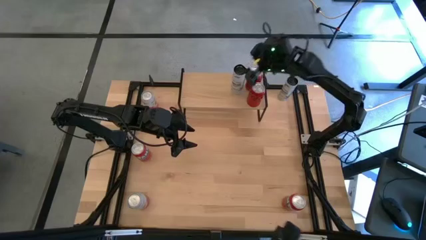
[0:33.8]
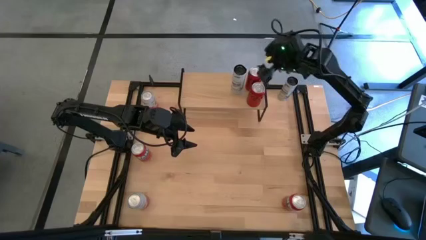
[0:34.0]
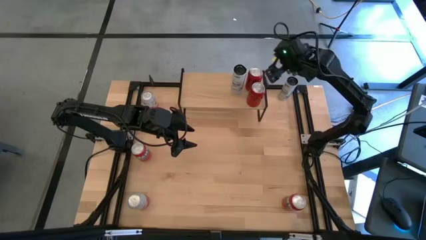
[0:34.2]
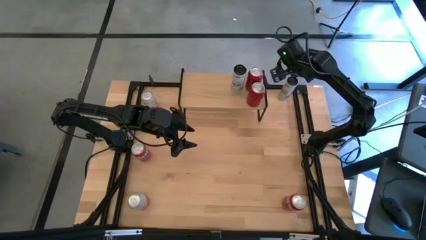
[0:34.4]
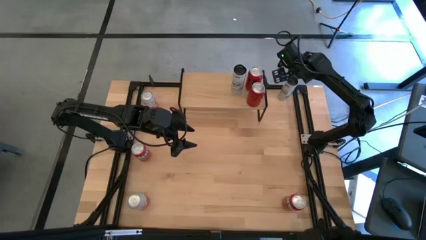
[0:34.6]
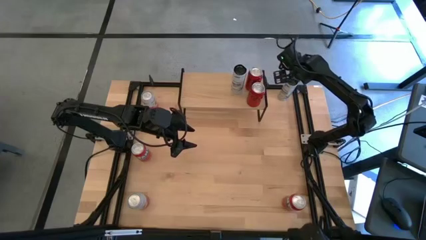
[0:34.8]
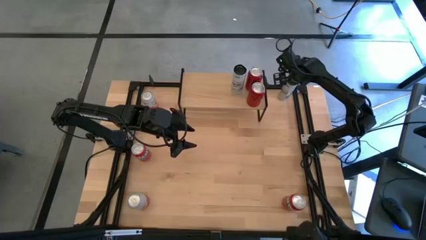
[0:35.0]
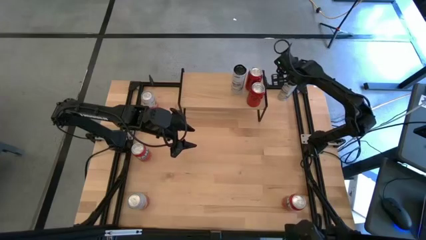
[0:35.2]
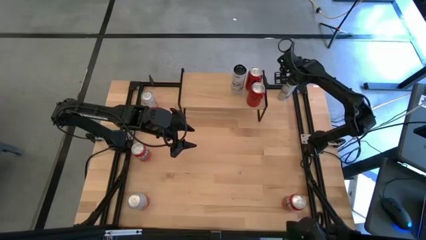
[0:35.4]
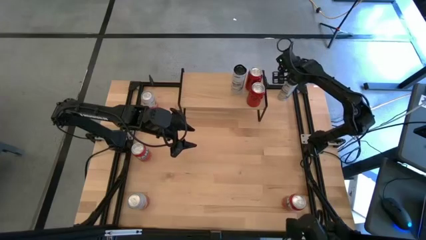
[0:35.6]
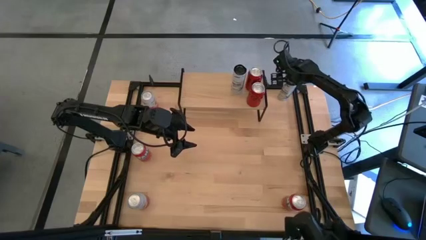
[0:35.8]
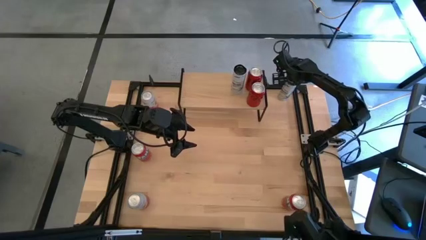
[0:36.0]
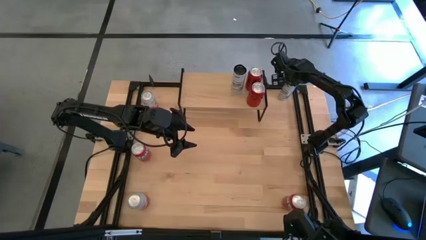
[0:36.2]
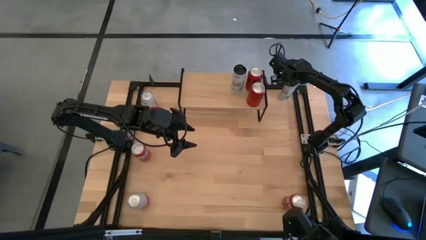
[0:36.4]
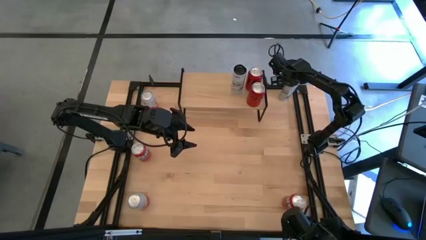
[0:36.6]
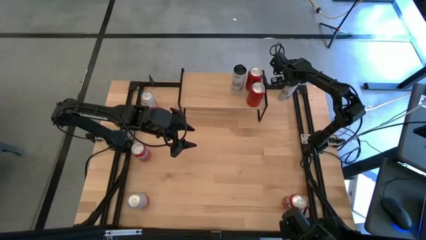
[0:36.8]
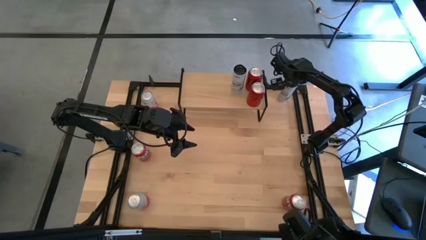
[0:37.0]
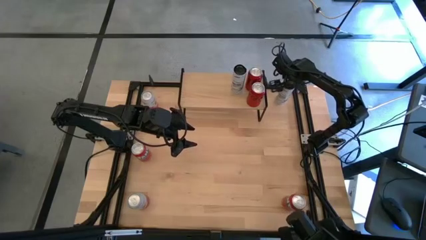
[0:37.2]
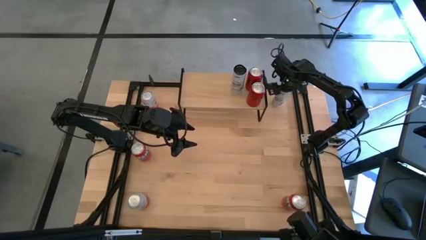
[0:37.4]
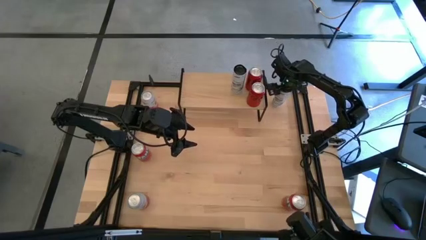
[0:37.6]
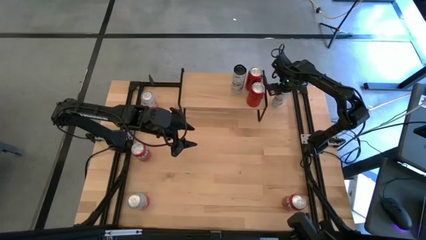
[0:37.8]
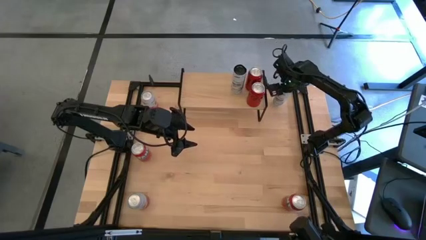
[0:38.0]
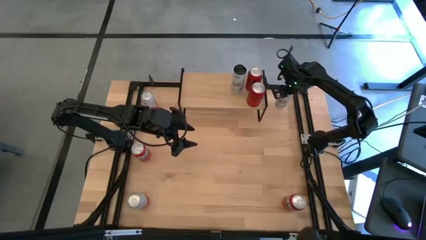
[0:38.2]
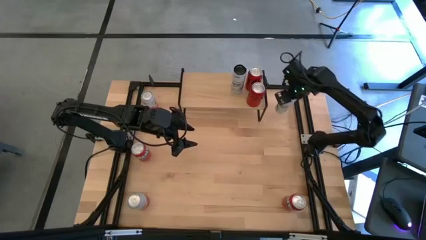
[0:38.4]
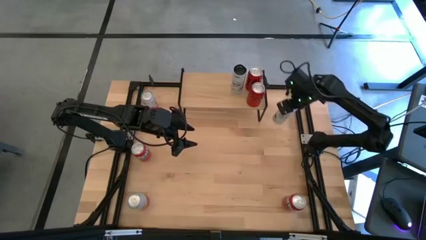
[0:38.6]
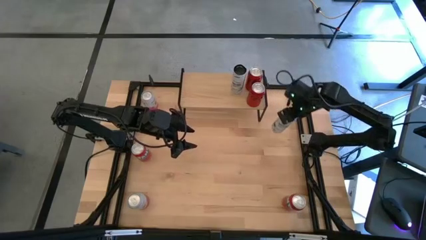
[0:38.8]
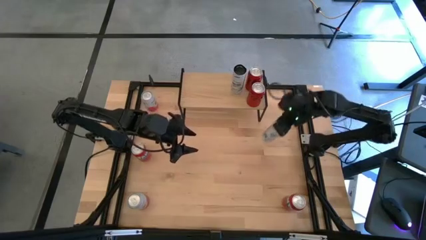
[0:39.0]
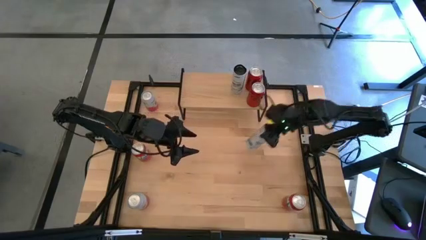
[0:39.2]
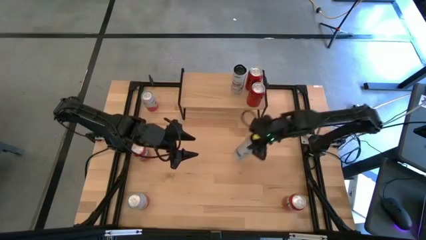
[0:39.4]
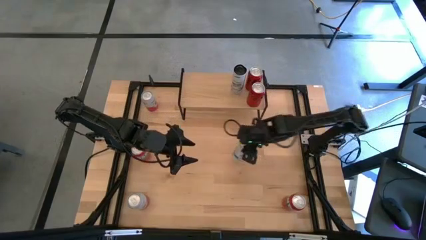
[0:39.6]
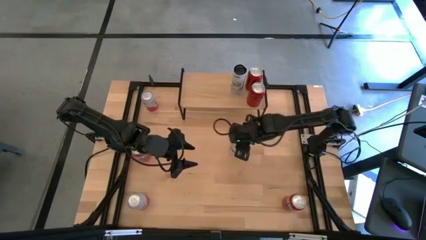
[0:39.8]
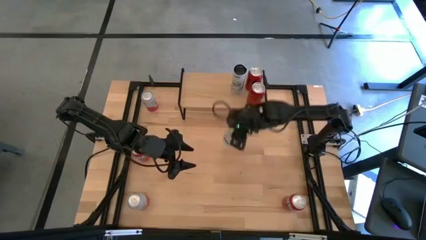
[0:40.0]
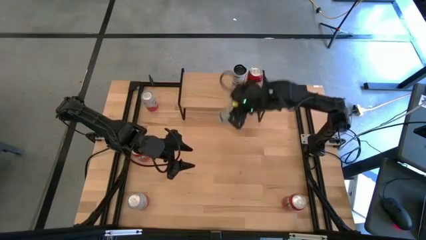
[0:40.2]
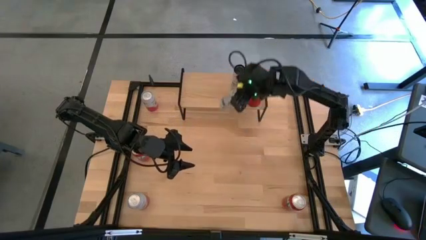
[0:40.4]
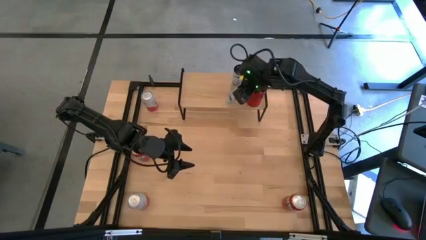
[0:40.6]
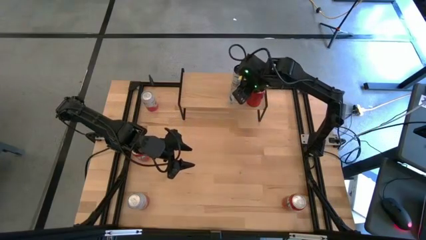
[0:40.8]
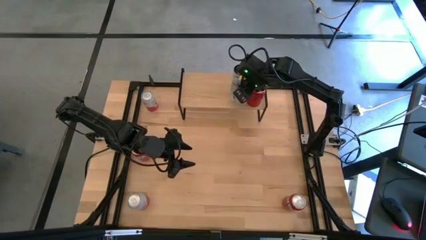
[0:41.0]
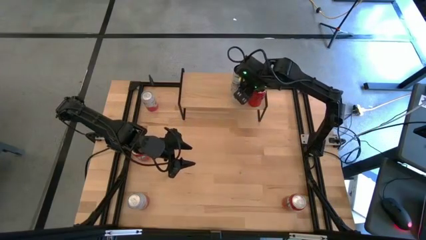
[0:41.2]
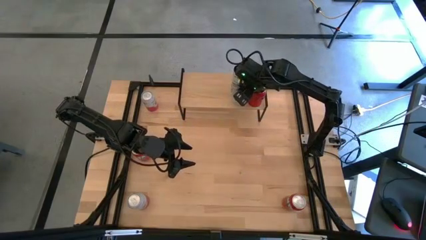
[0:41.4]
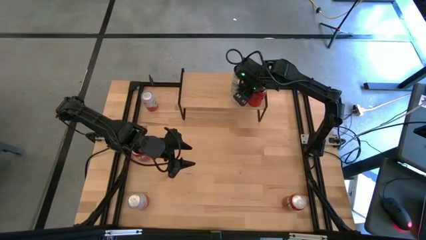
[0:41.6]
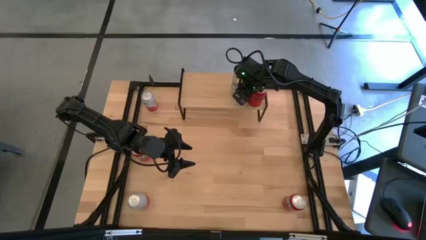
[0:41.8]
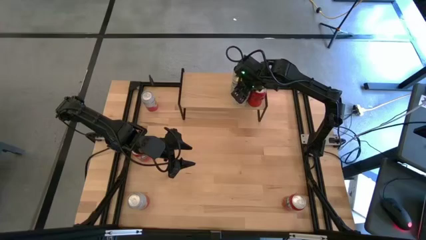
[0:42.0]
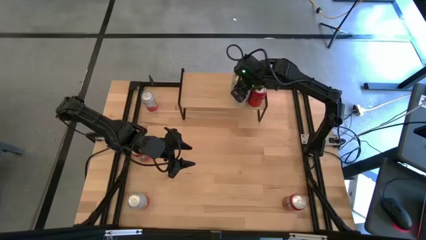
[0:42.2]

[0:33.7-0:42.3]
Task: Place canned beverage on shelf
Put the white and blue soda can aligned with the other white and blue soda can on the shelf

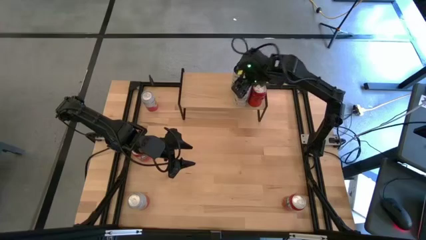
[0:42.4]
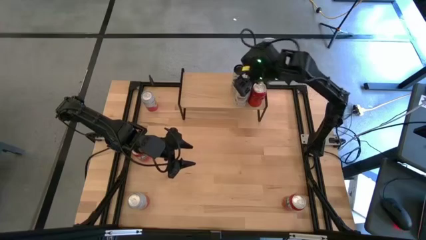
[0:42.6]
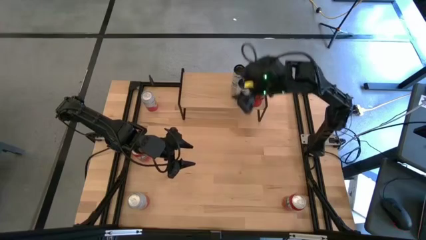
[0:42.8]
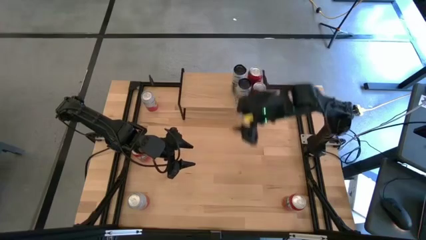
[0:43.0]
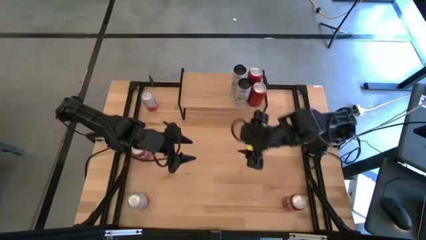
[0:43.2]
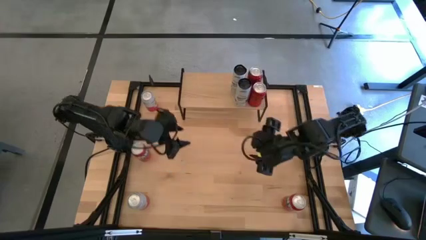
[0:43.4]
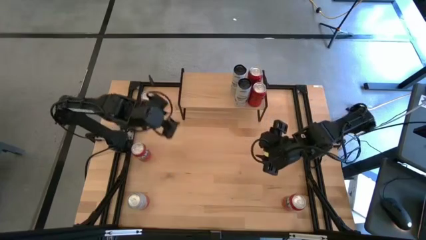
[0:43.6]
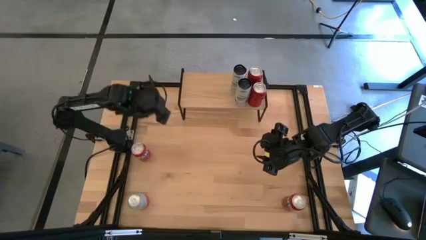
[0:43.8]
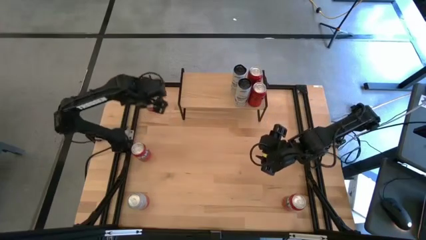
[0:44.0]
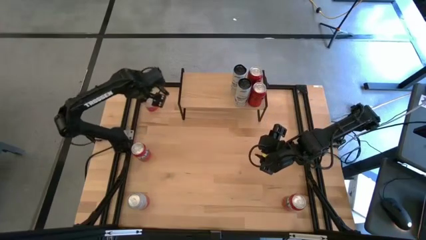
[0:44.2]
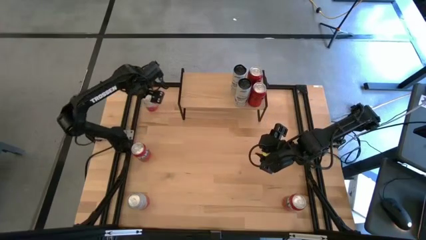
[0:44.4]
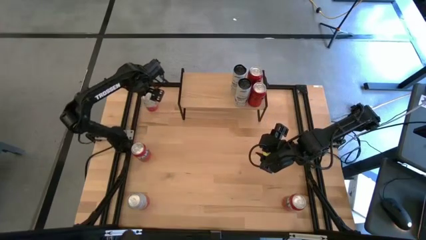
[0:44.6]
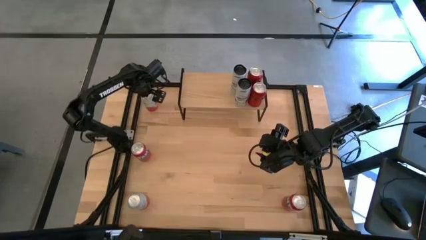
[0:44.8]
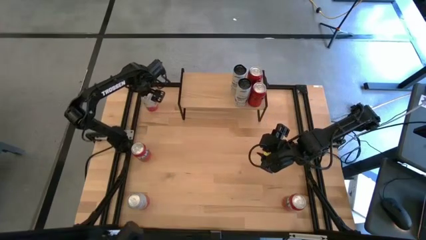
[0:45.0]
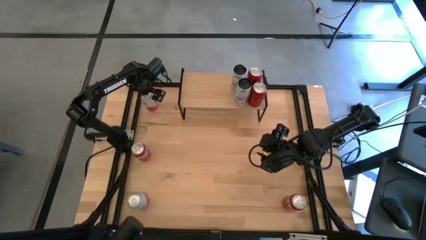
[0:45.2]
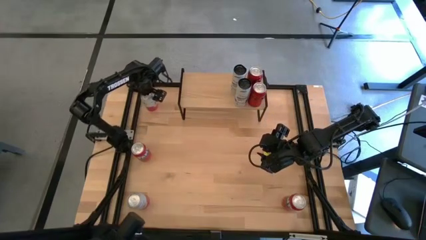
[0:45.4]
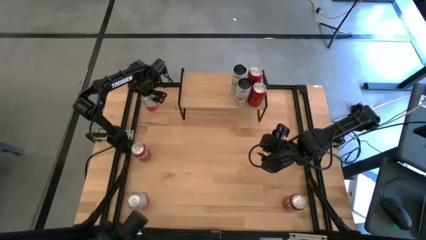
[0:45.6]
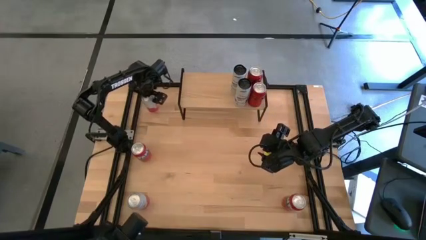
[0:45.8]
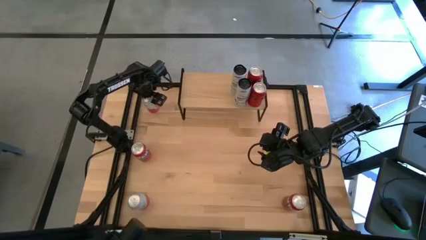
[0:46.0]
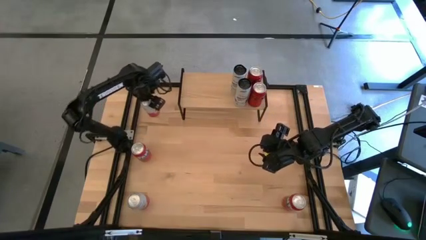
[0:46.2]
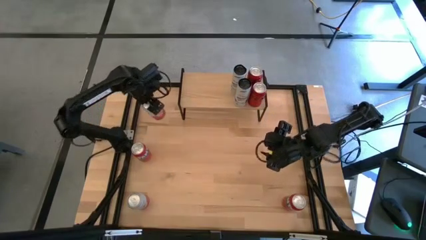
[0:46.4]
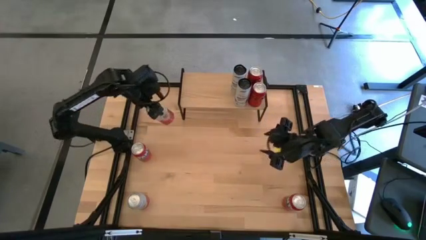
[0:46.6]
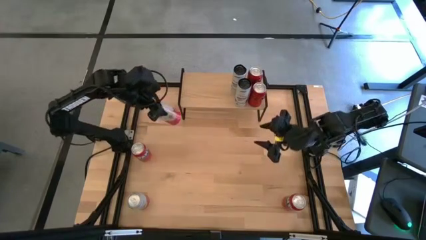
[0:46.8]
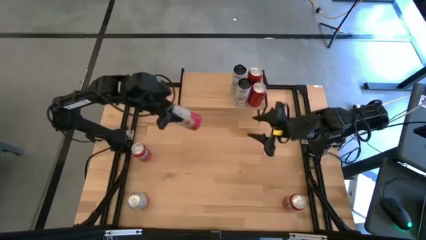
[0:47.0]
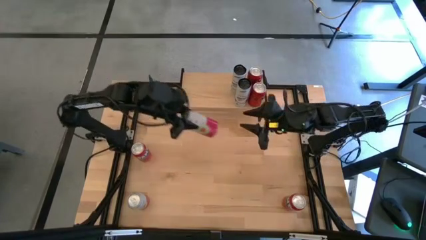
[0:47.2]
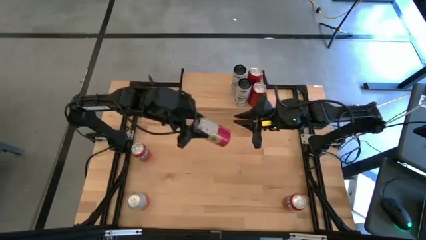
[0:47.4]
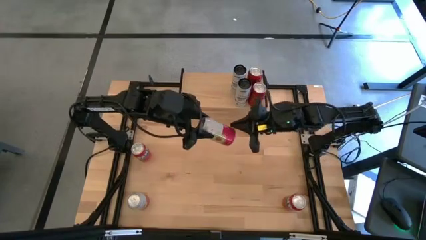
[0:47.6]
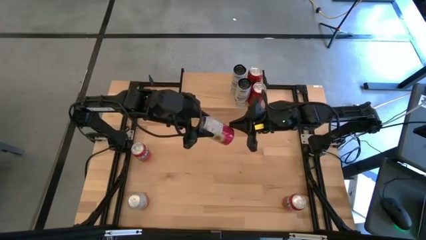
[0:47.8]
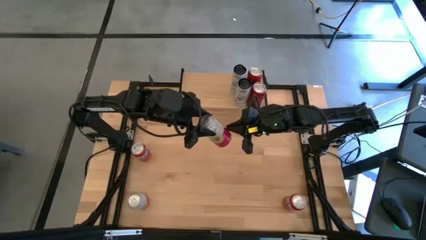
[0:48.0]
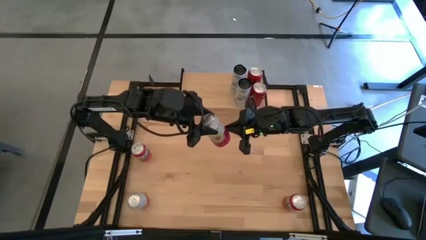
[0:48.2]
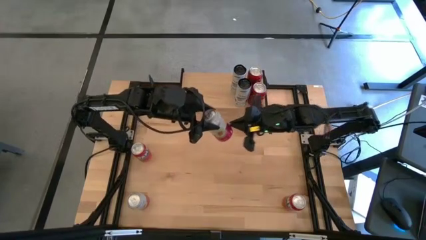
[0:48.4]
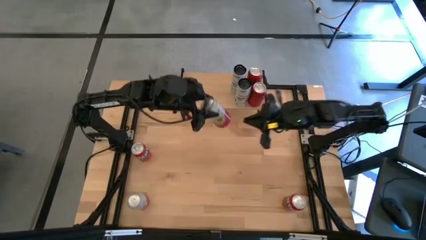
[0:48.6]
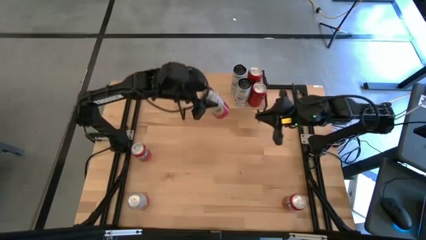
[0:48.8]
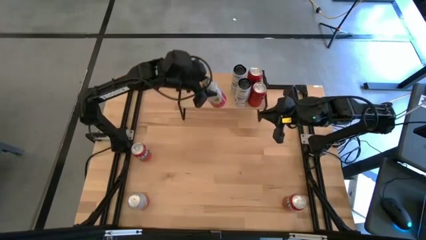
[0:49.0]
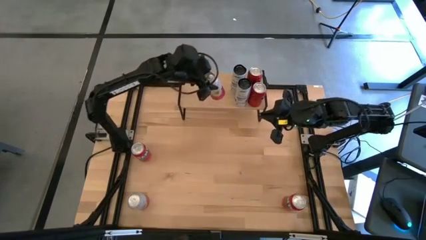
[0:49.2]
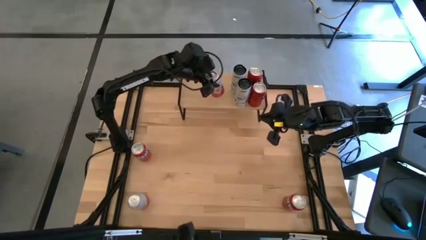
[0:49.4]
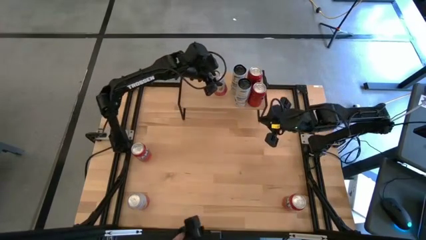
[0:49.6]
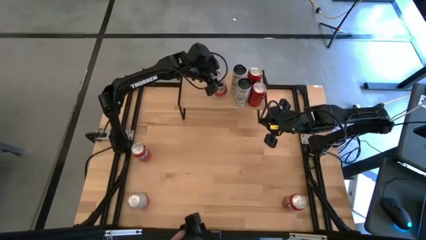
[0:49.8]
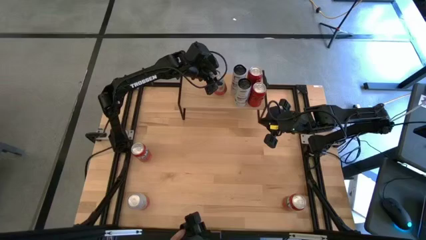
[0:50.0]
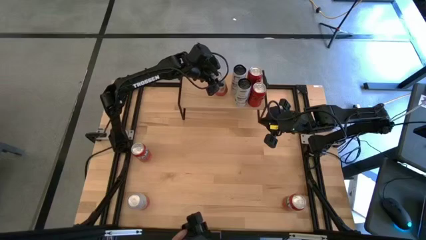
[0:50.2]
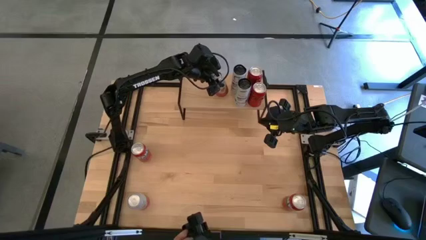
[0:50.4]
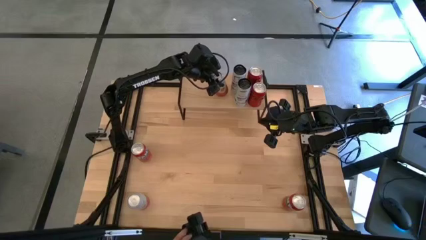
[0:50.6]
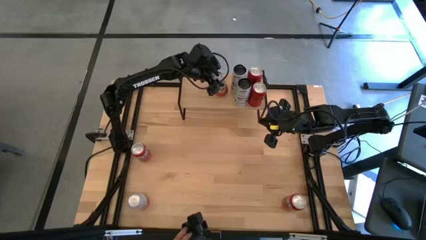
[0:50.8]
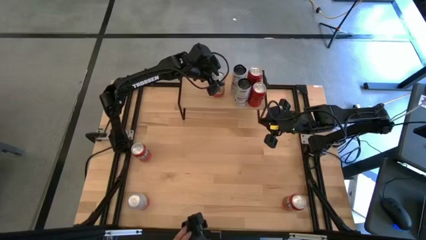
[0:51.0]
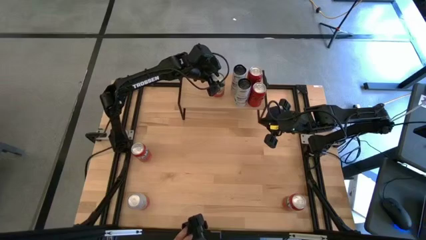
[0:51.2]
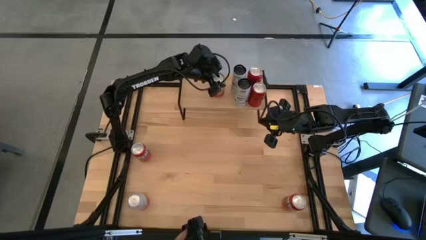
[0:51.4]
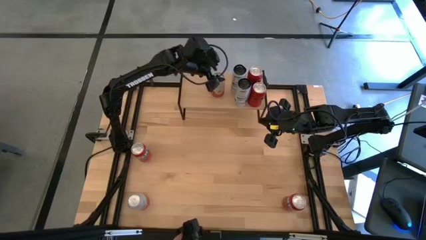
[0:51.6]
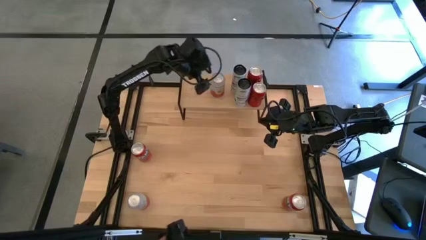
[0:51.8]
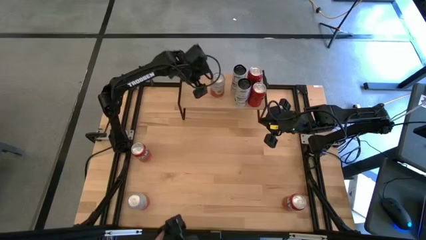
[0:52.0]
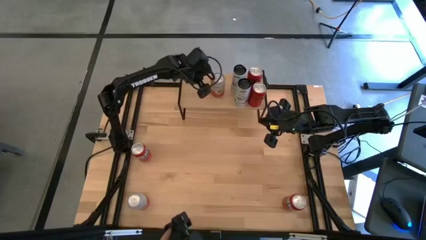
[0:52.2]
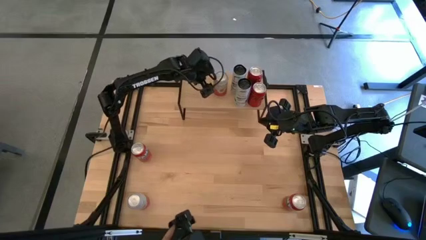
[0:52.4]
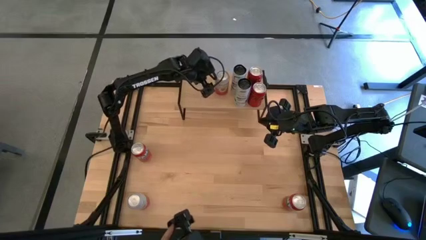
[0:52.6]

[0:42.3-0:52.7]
Put the top pink and white soda can on the shelf
